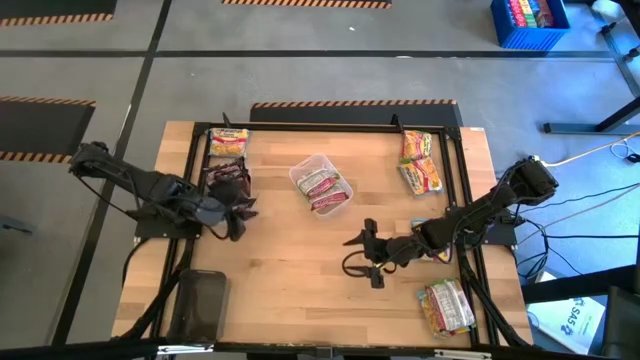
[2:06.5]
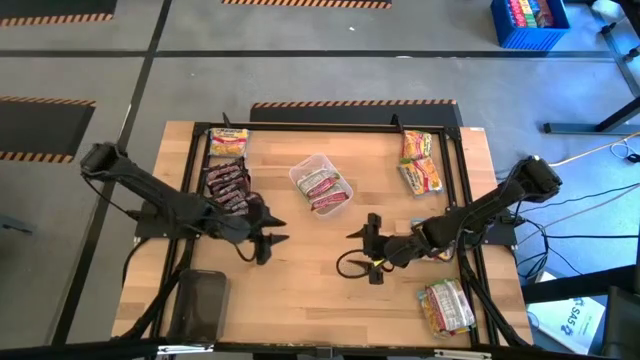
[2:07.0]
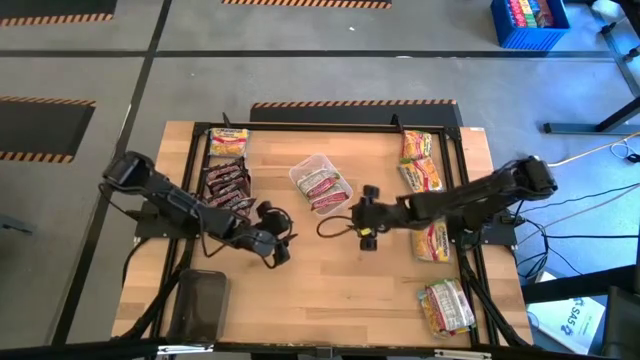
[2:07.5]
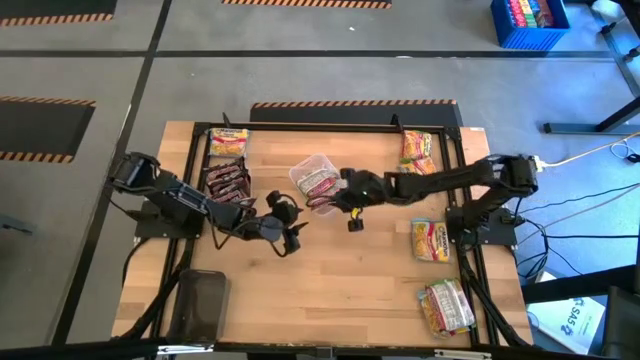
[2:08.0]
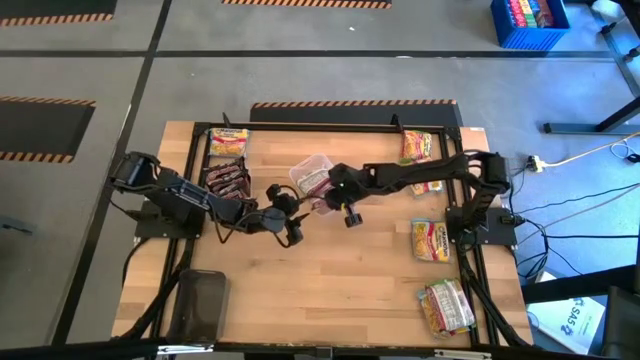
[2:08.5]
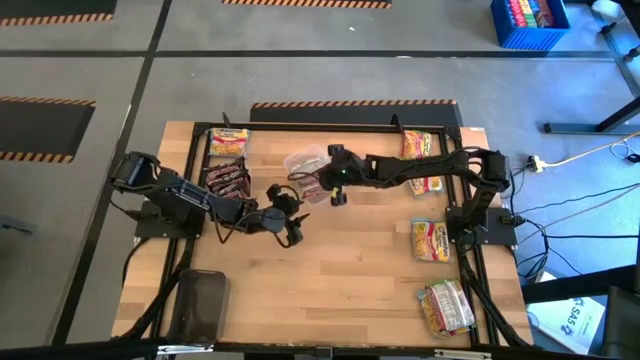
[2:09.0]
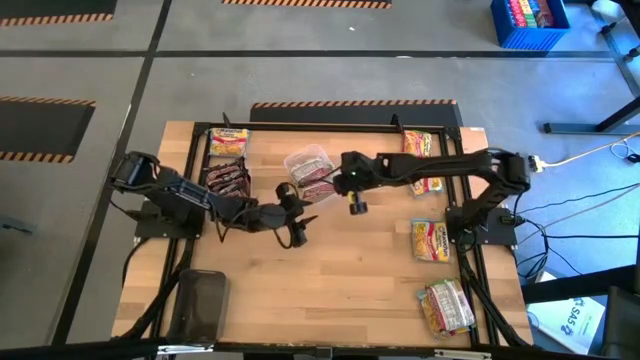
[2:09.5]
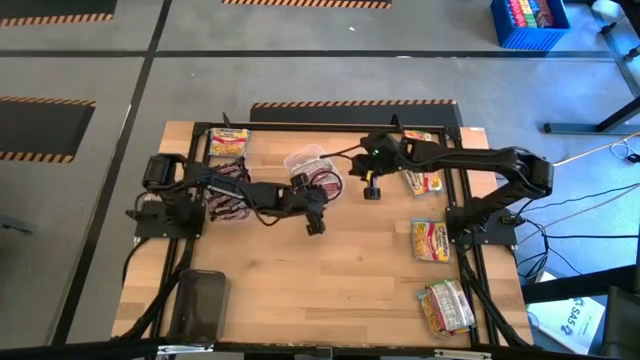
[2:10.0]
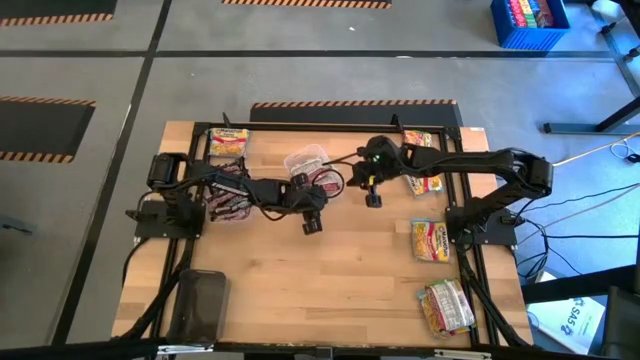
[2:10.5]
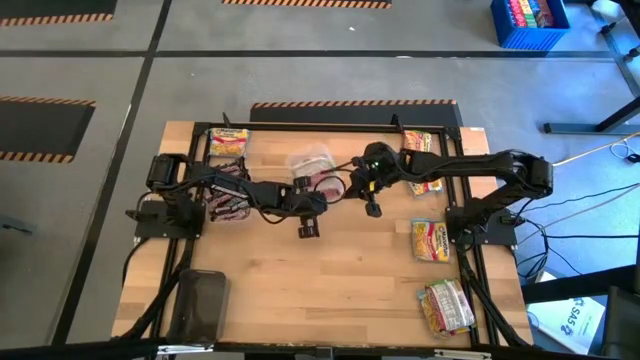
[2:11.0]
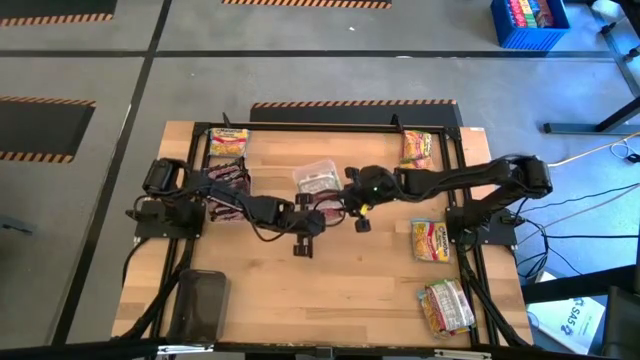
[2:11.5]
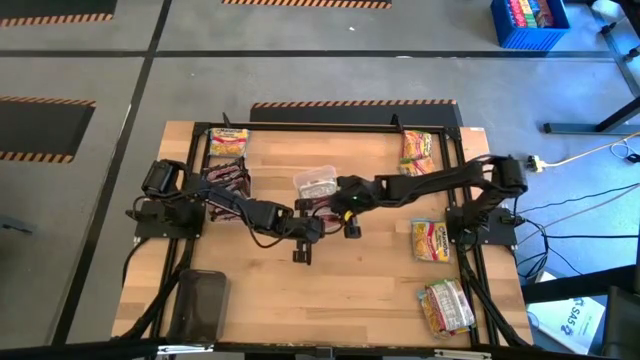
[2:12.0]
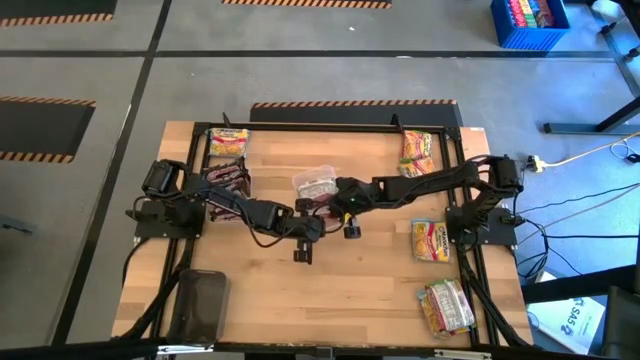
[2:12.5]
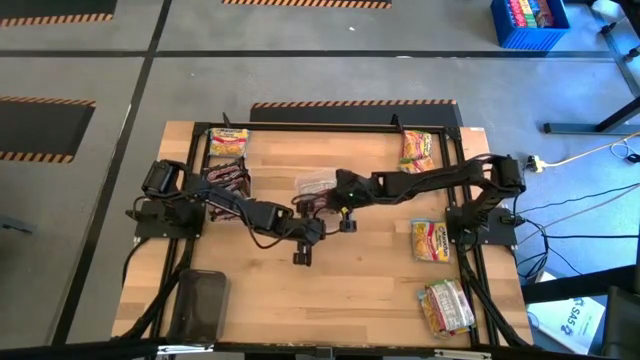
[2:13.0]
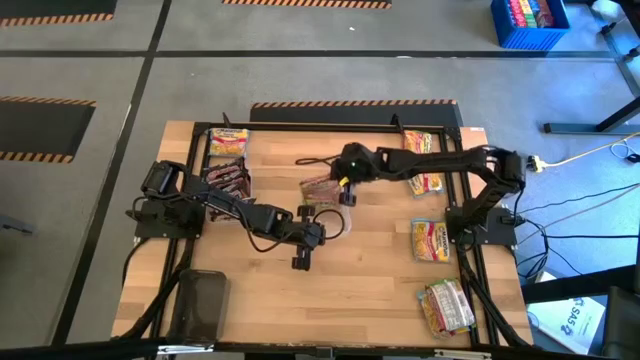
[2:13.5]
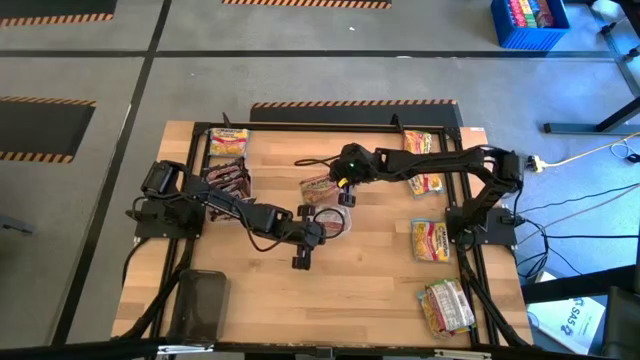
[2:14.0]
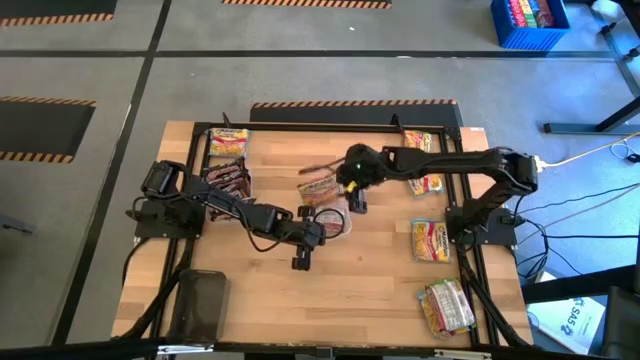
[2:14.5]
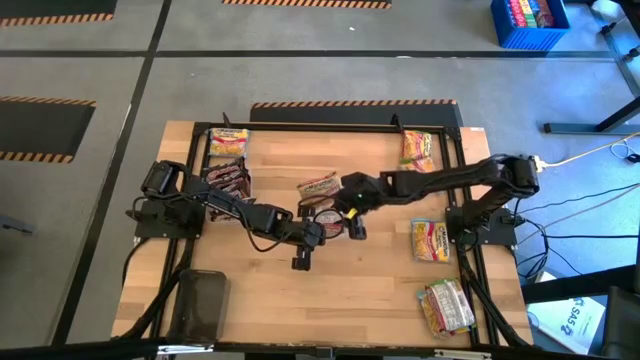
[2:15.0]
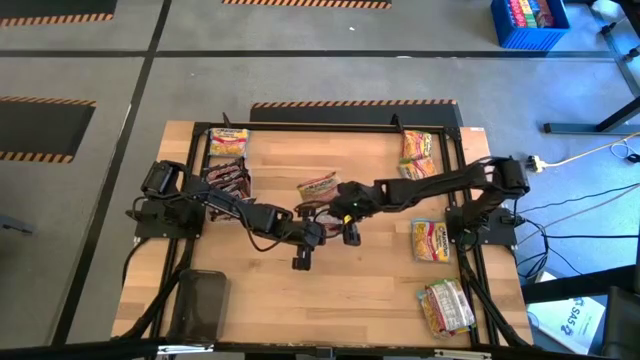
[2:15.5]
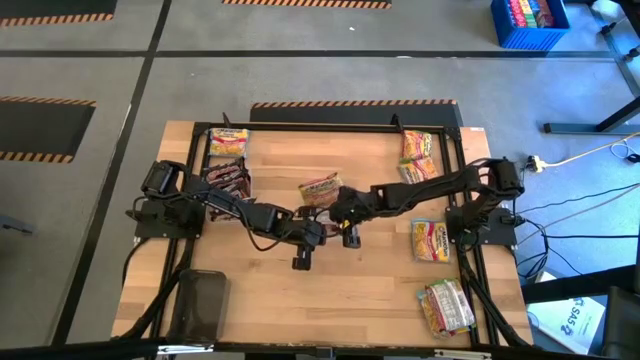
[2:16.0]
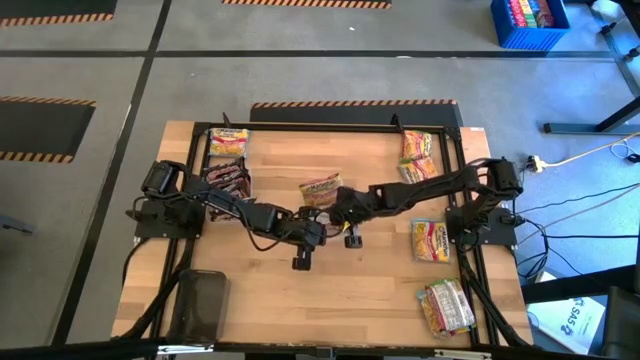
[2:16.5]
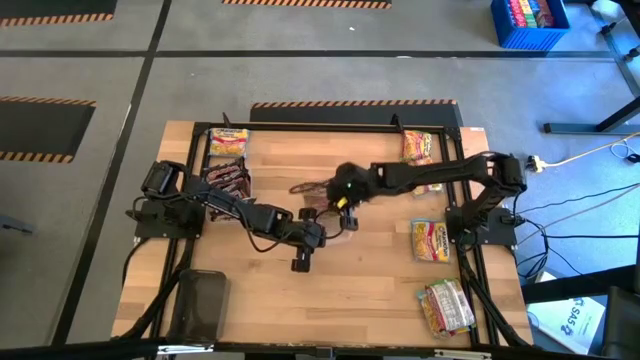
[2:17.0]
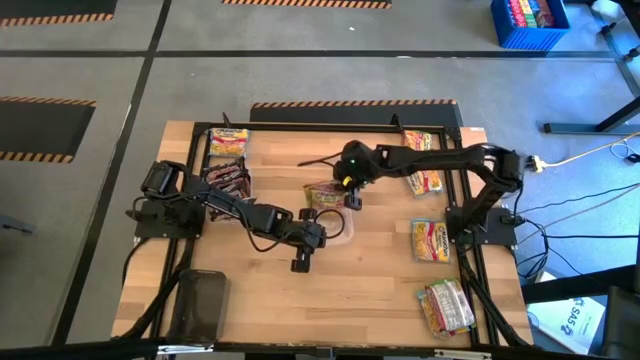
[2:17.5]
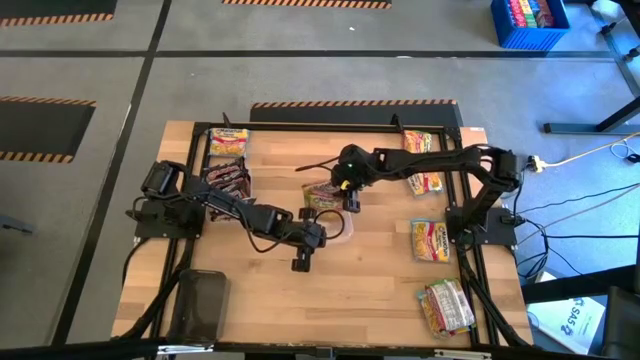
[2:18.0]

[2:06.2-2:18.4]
Task: Sort Maruchan noodles
Adjust the green noodle packs in the bin

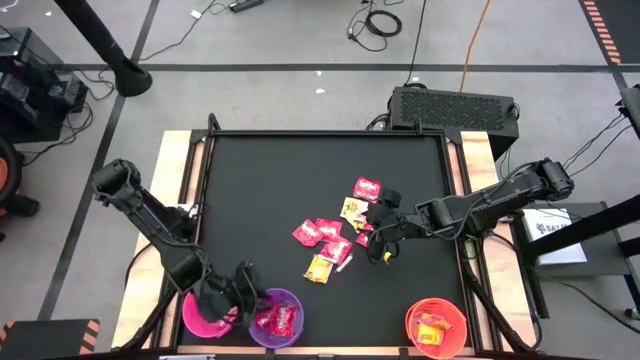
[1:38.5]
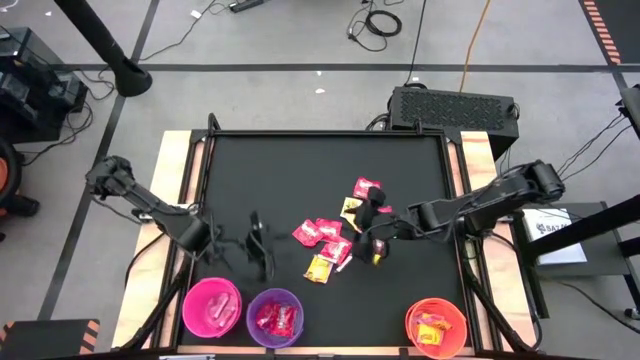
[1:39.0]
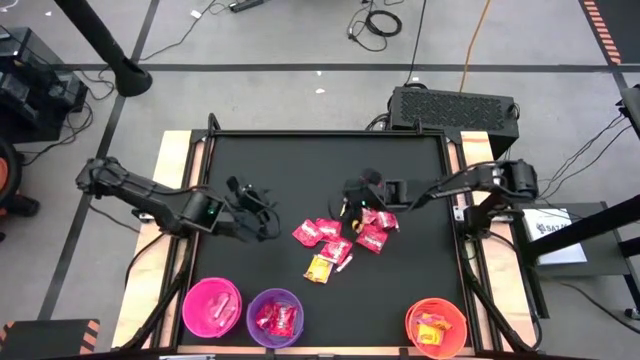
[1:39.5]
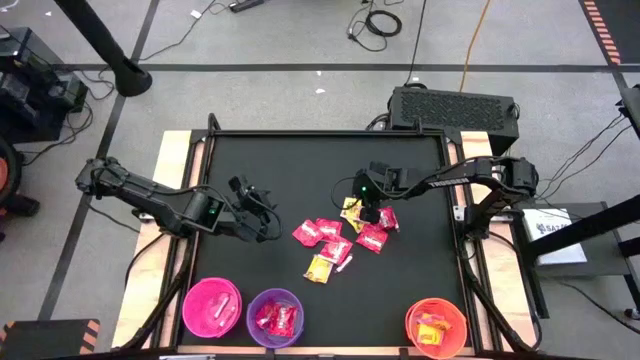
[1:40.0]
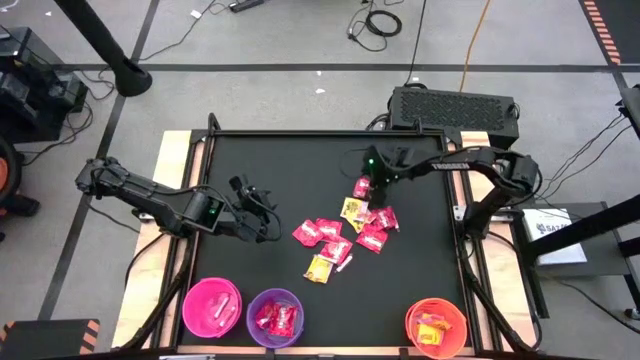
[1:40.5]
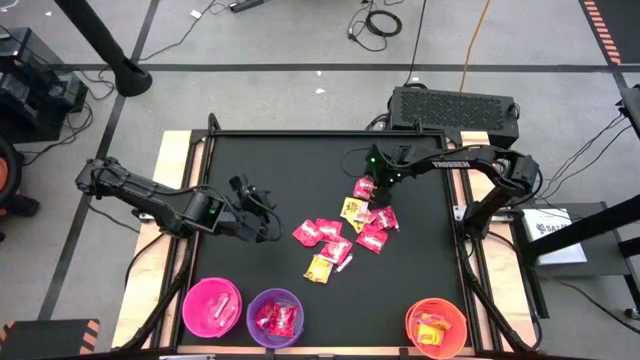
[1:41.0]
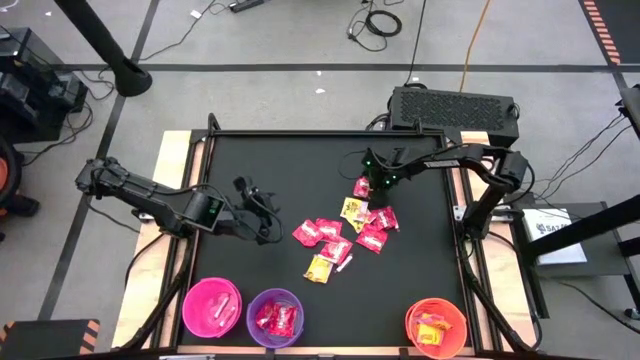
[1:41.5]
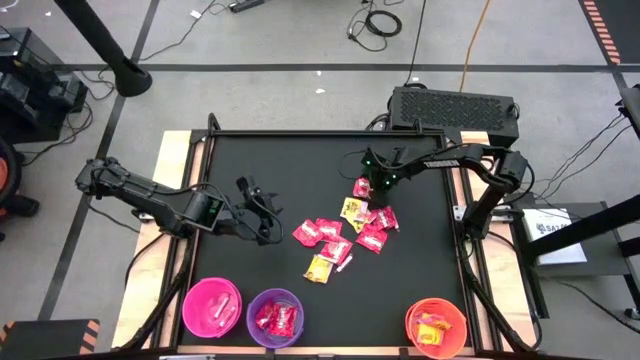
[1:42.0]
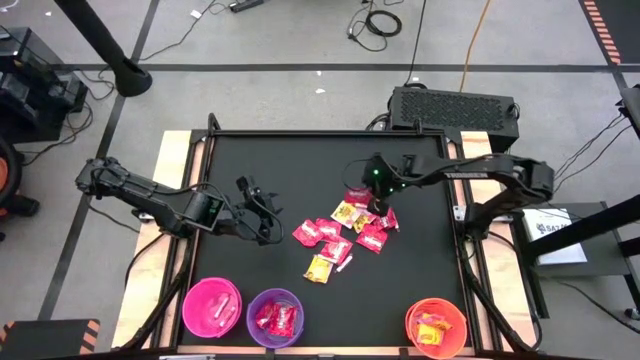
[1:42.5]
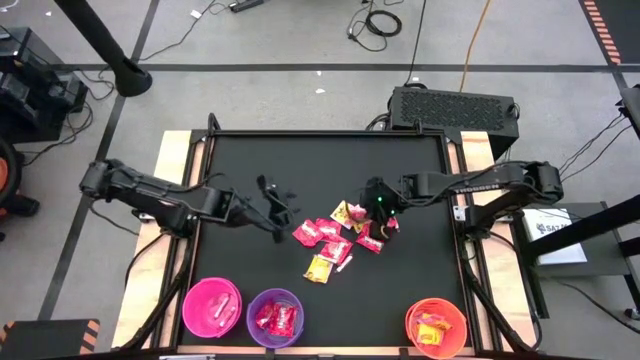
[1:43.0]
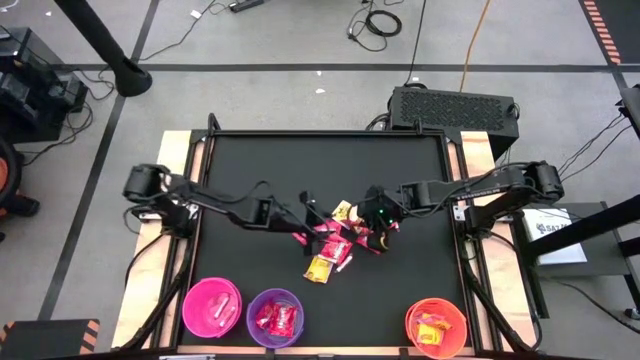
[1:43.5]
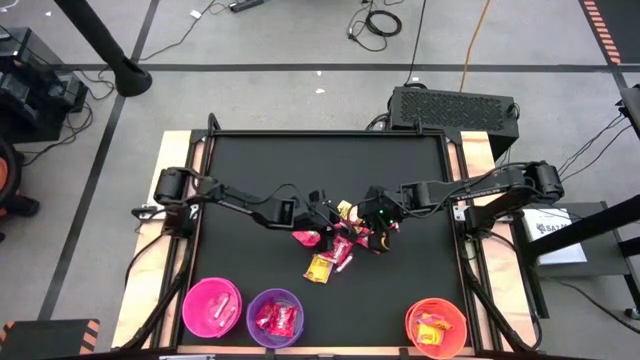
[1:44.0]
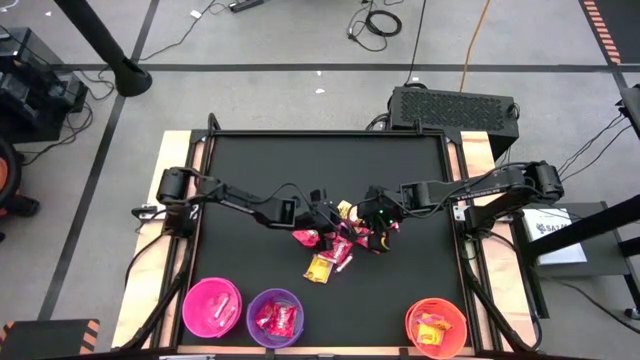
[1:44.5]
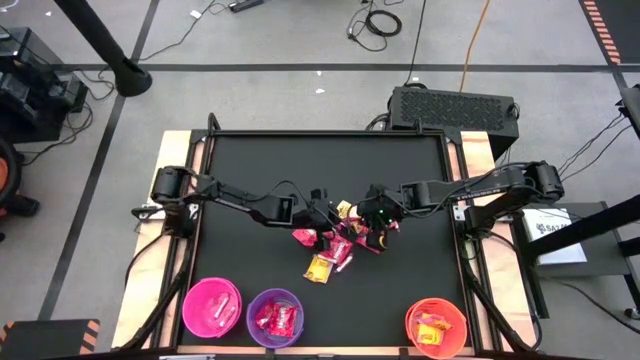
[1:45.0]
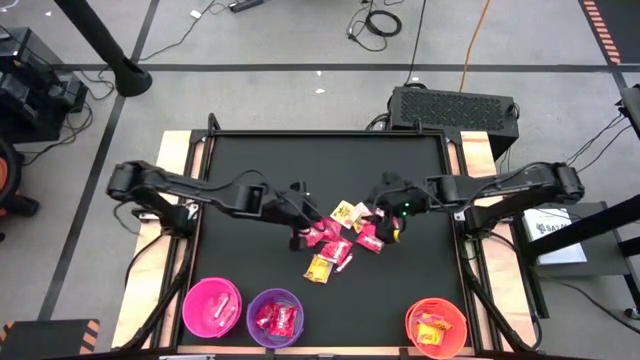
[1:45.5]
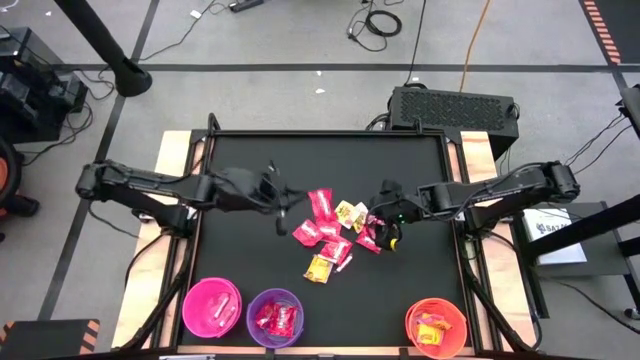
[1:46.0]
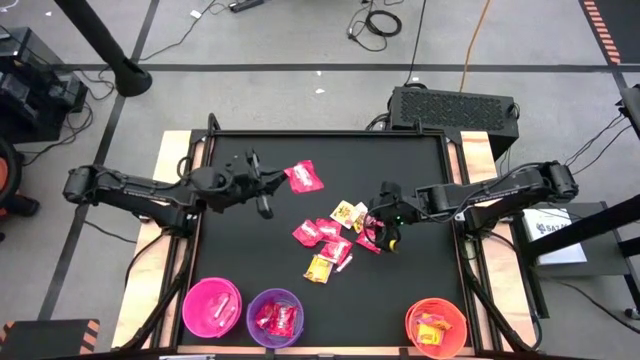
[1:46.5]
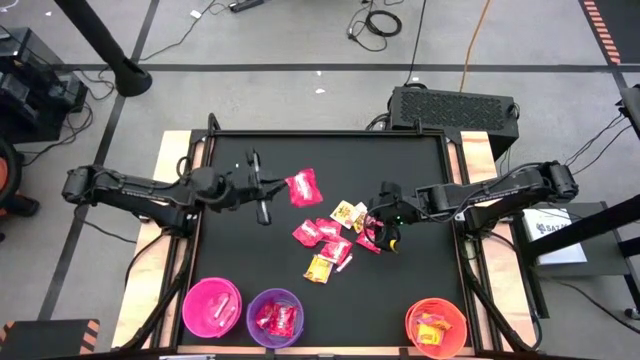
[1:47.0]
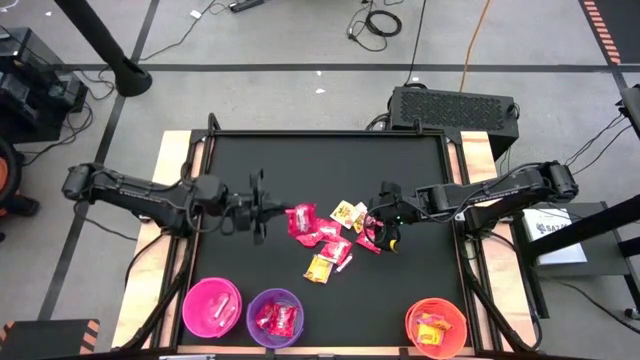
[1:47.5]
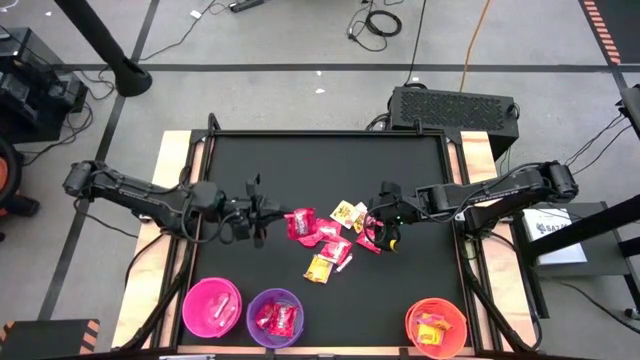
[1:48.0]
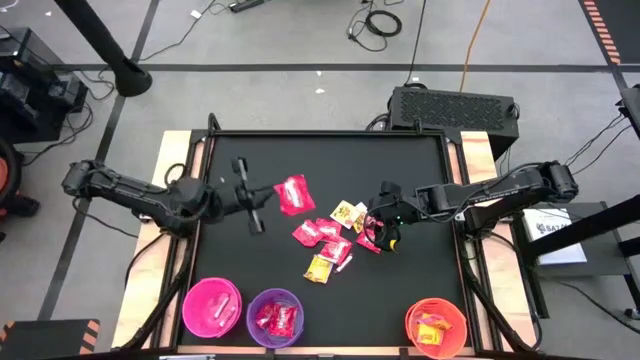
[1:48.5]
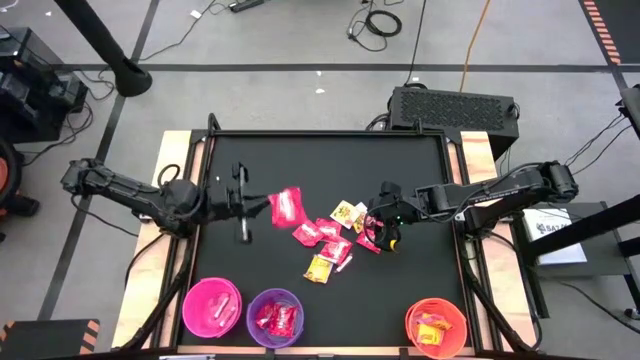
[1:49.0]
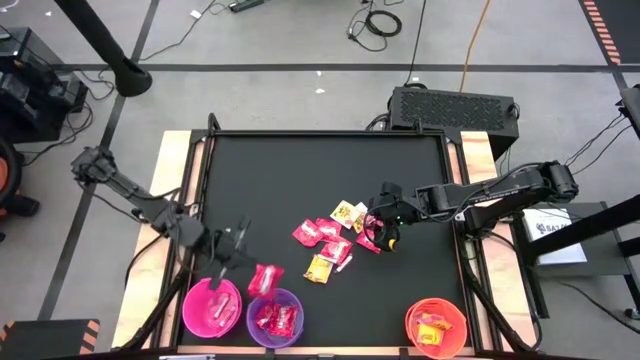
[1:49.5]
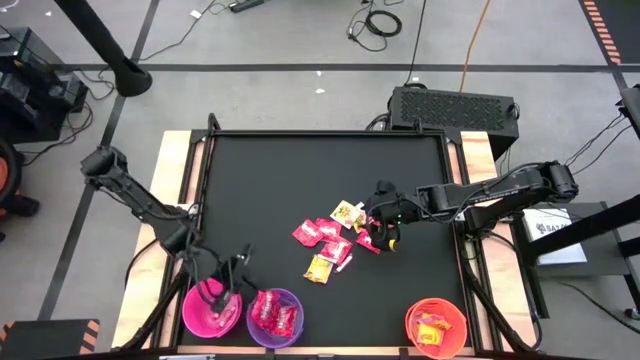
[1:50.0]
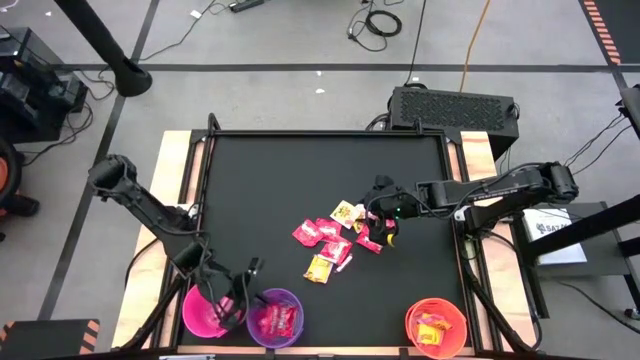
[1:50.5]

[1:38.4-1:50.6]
Task: Sort candy by brand, put in halloween buckets
Put the red candy into the violet bucket
